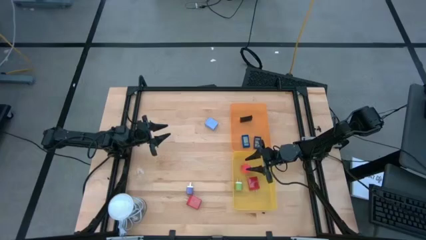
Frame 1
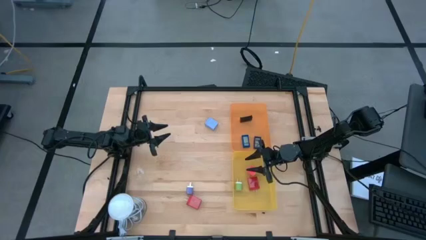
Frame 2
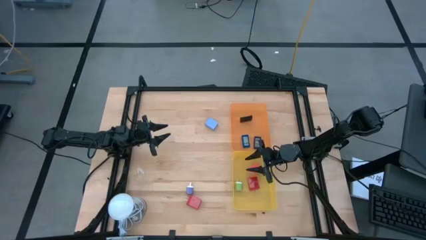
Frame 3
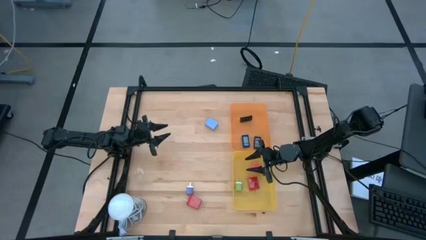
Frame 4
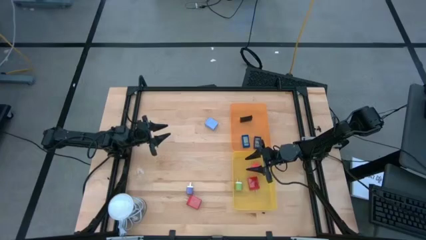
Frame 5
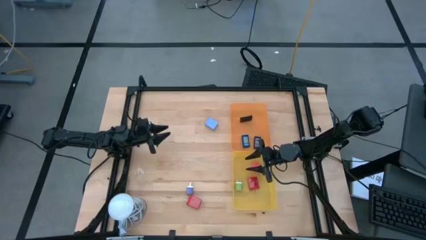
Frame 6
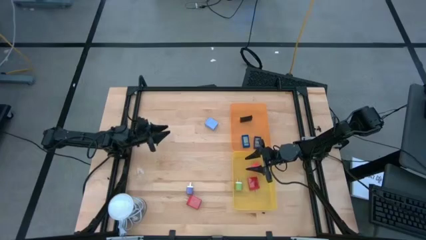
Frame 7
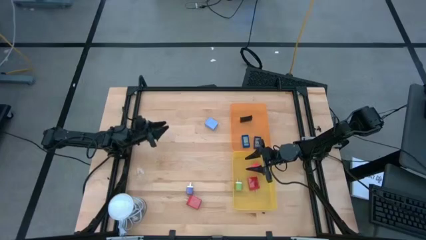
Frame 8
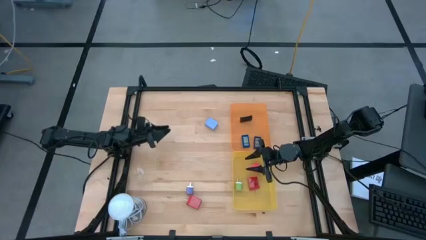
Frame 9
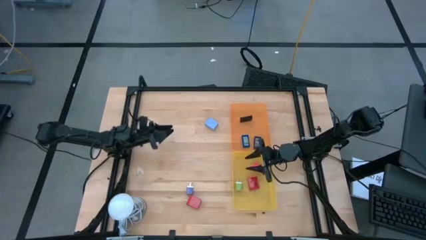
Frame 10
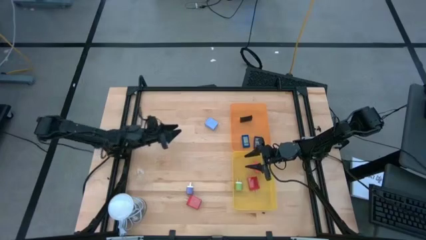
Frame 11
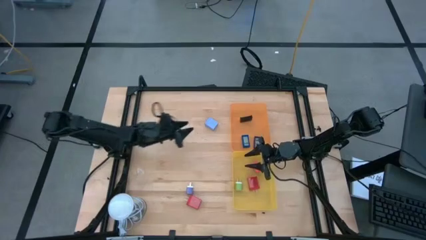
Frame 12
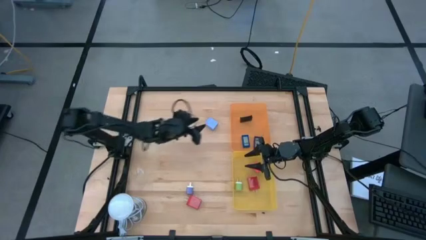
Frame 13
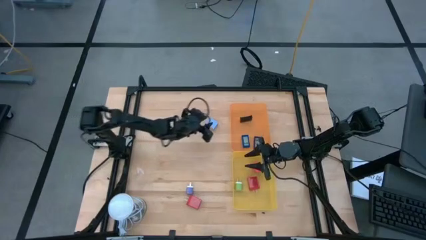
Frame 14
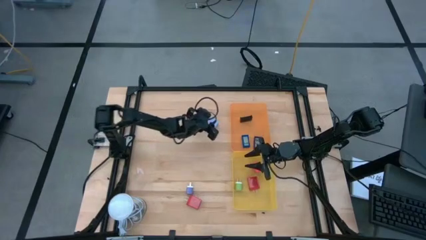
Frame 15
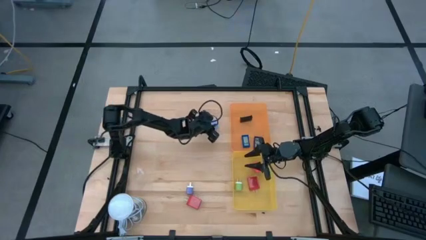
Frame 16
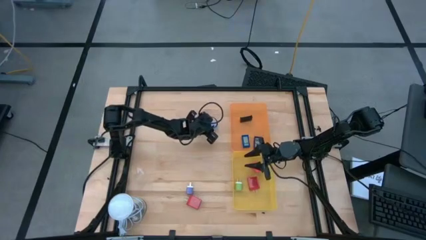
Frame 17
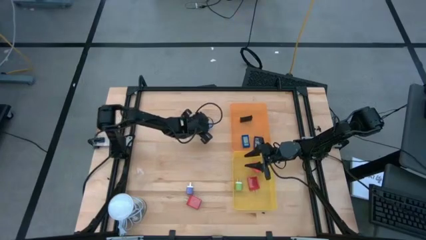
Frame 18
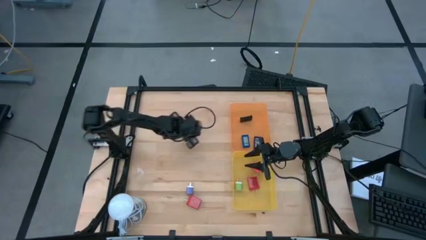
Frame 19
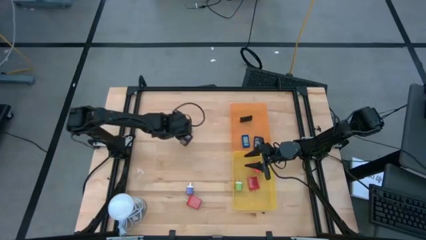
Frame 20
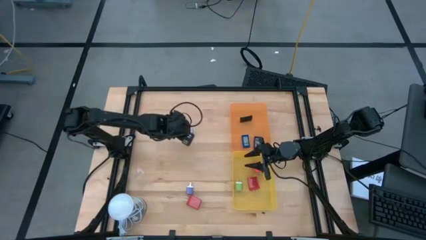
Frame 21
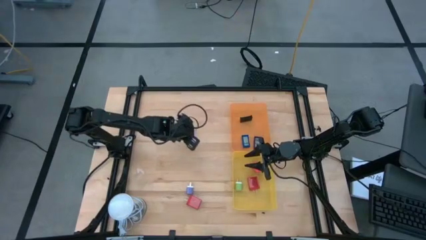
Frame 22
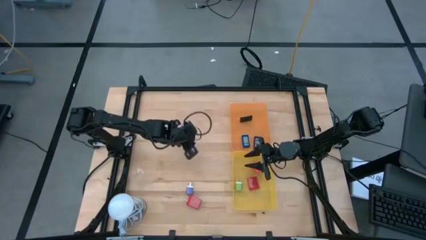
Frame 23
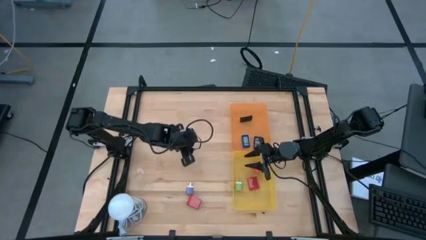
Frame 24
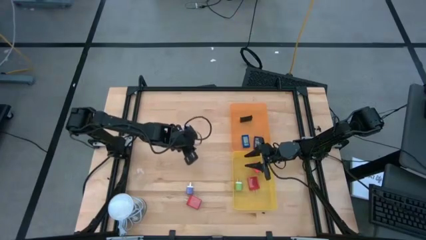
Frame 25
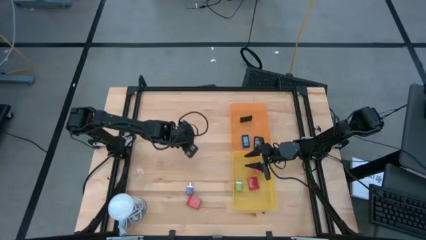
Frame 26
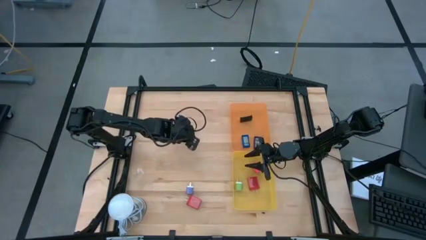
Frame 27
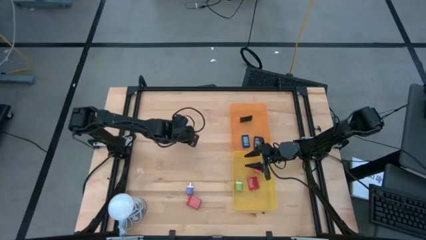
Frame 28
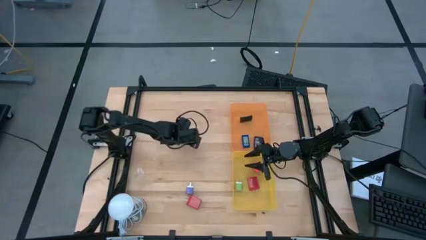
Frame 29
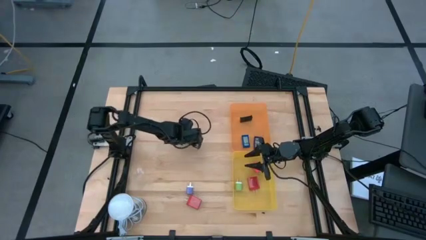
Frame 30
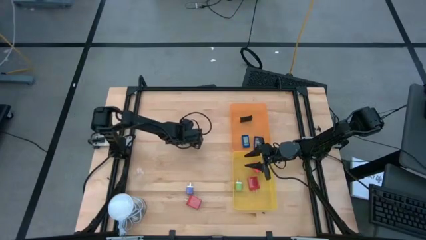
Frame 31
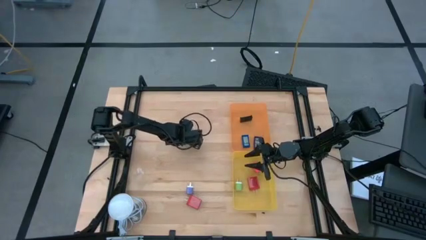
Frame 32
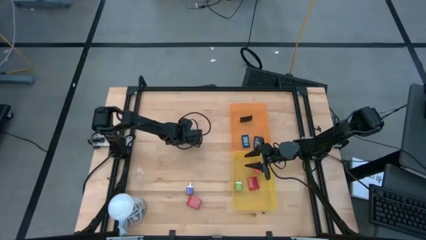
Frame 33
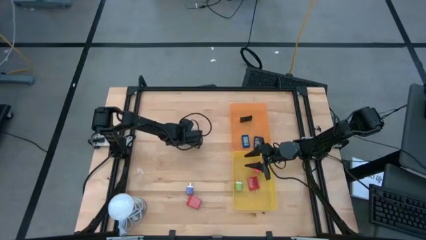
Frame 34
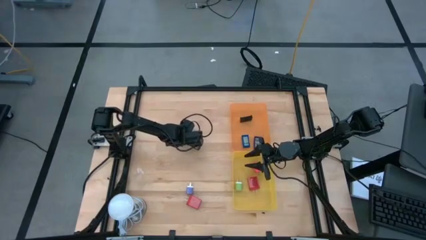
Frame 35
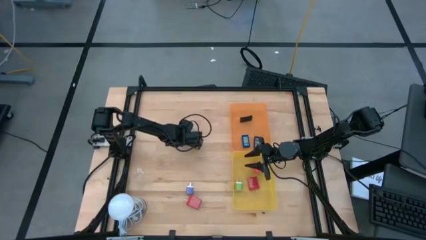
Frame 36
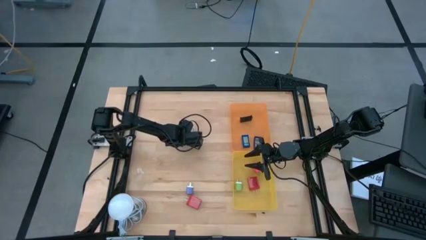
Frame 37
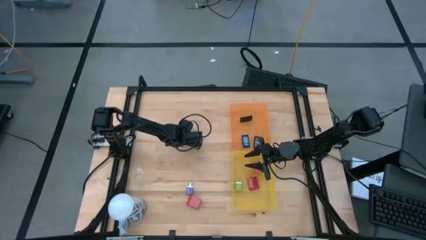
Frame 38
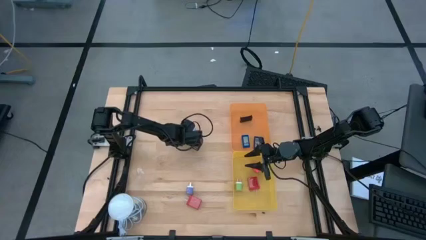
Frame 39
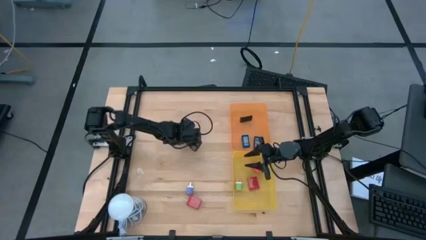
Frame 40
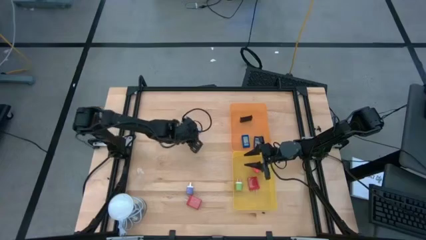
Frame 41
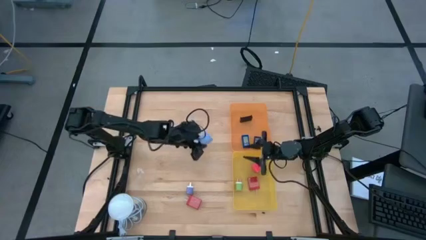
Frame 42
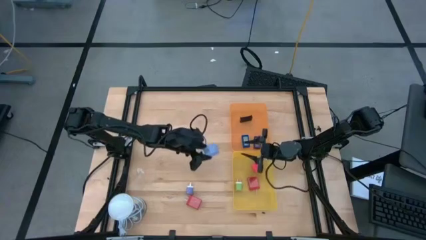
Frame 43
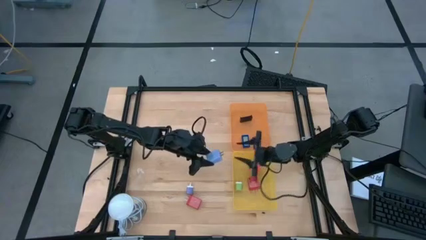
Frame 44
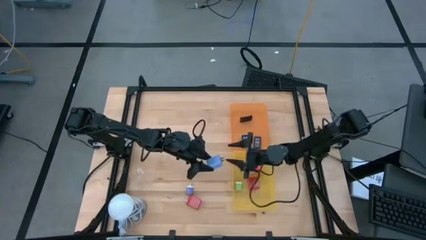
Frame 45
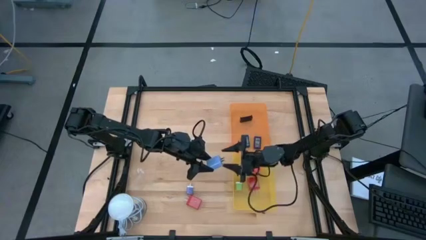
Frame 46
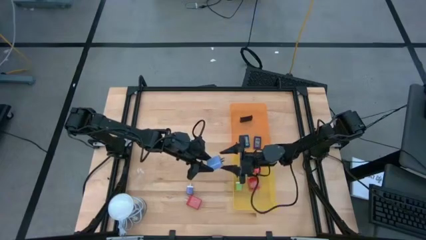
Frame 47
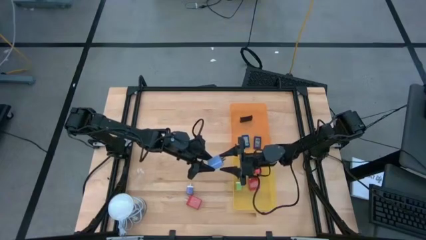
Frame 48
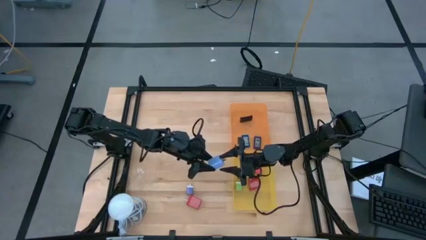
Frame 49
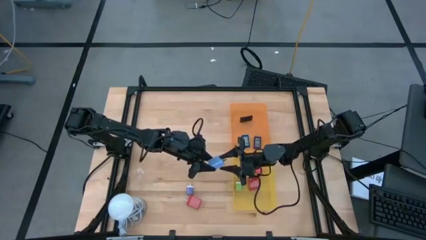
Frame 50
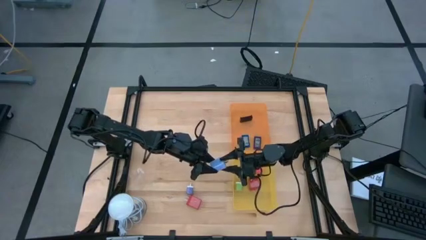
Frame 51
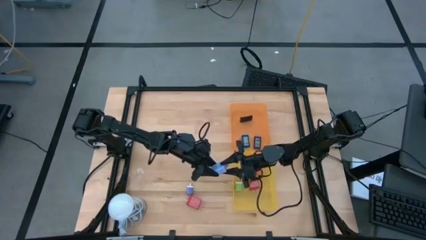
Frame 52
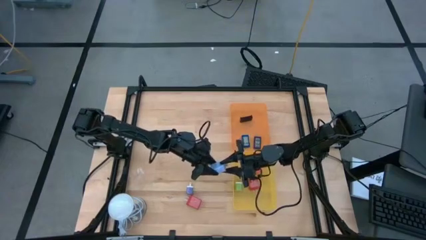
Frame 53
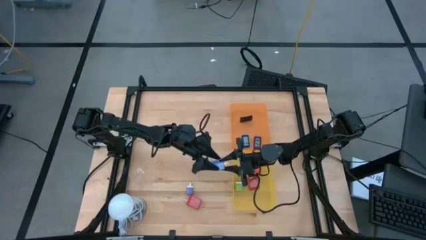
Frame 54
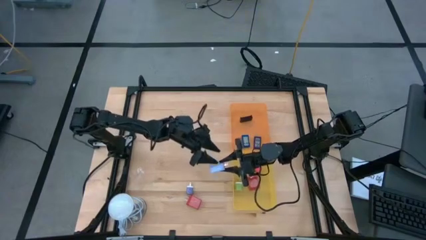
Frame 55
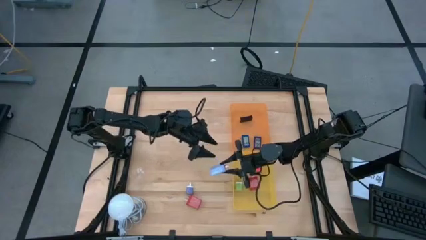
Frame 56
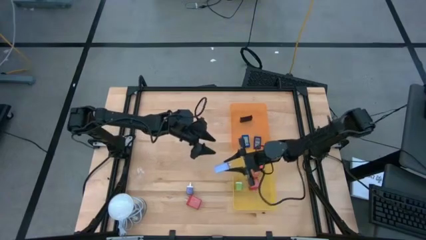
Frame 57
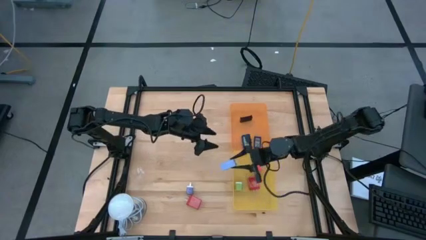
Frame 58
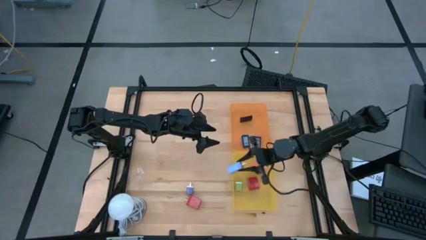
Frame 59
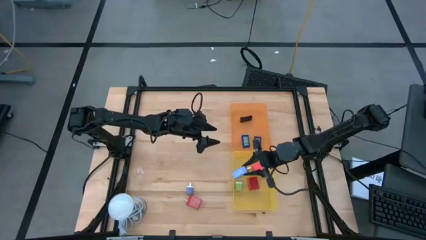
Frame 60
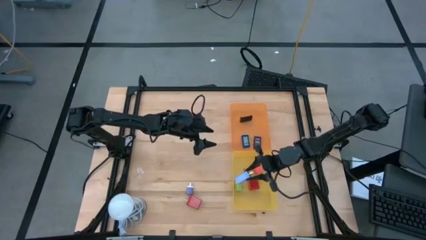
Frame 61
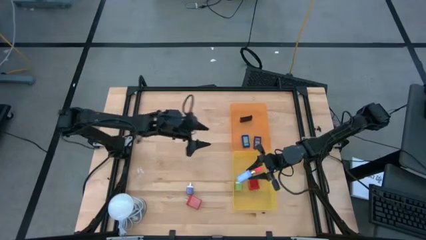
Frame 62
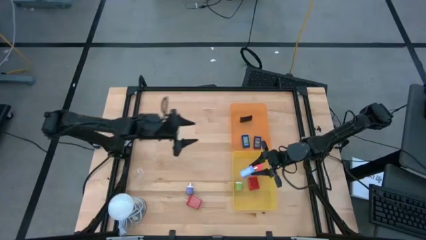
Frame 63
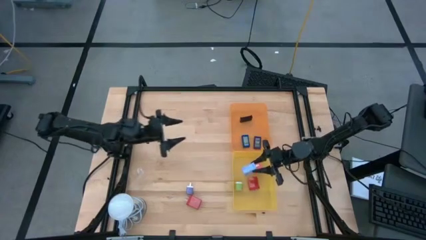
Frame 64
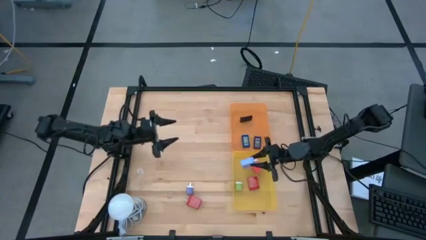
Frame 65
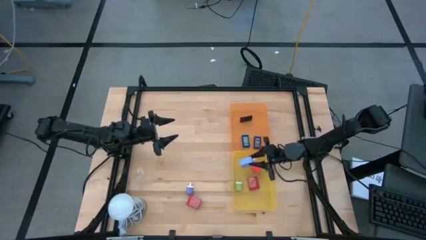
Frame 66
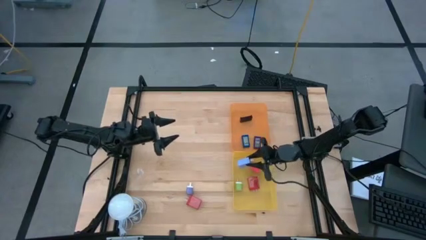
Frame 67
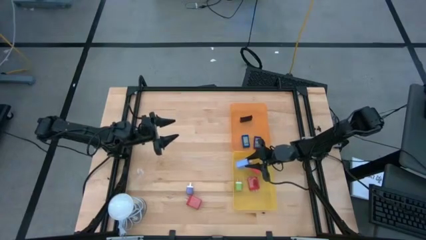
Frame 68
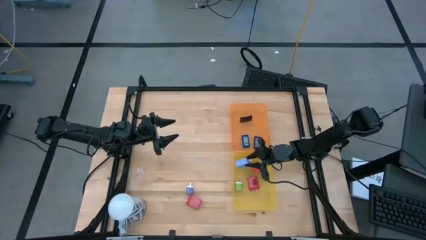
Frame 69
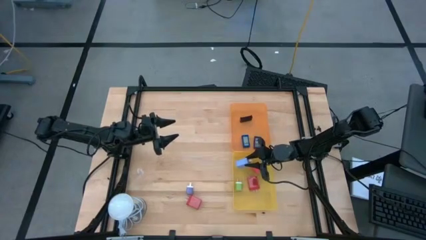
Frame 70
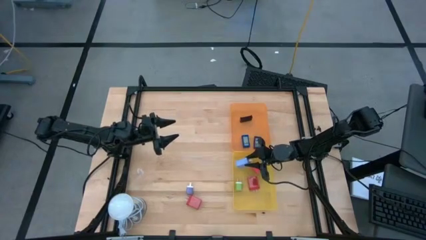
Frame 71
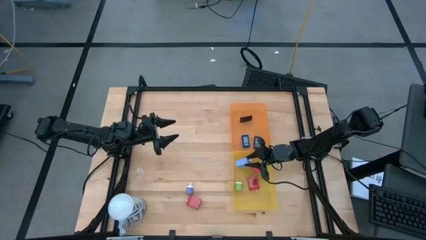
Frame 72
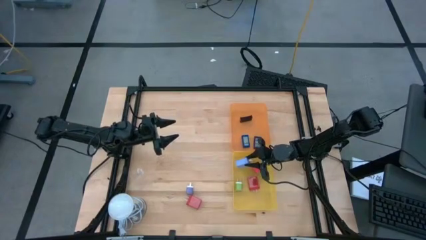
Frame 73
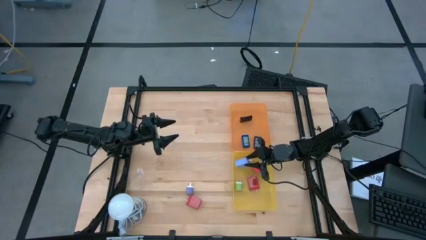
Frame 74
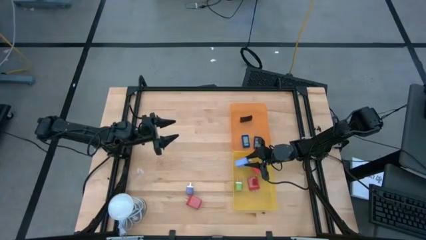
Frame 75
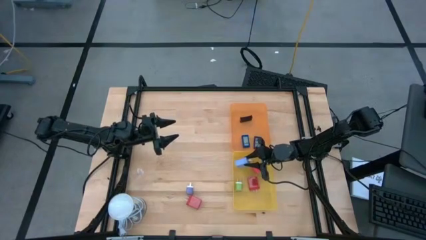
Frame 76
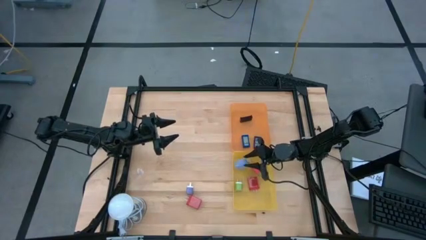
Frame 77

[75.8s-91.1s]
Task: Pick & Place Office items
Put the blue charger adapter into the yellow bin
